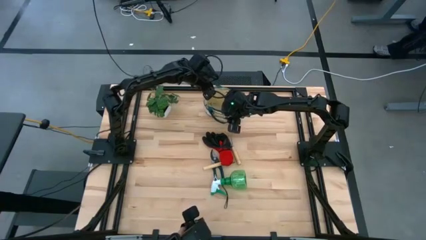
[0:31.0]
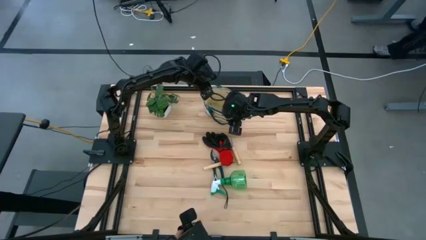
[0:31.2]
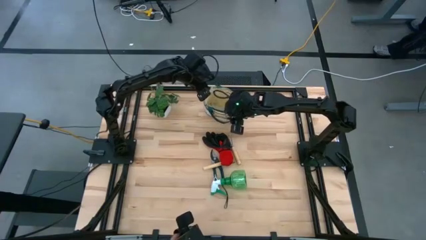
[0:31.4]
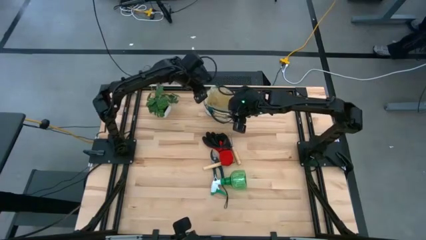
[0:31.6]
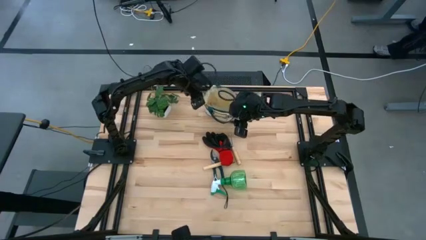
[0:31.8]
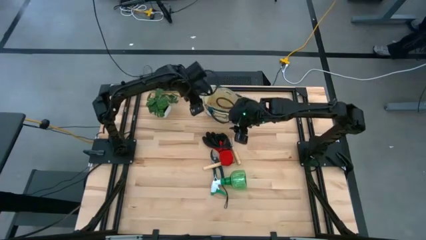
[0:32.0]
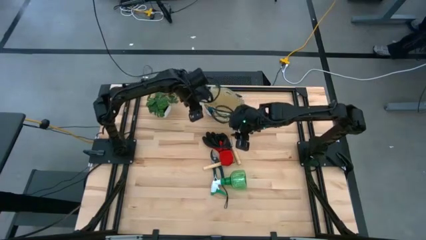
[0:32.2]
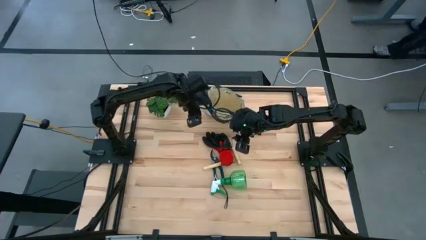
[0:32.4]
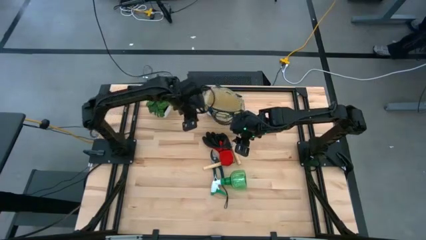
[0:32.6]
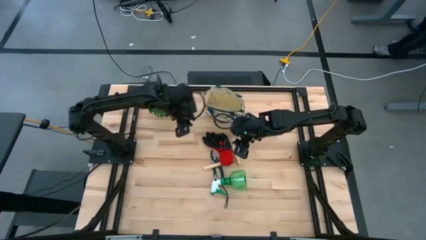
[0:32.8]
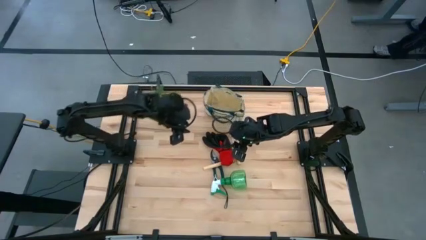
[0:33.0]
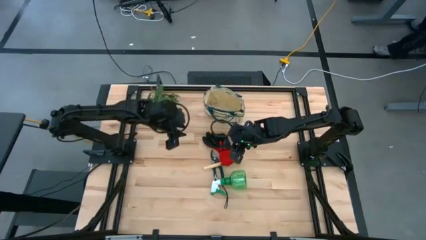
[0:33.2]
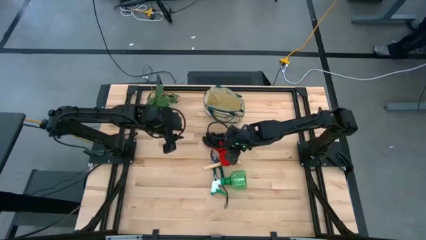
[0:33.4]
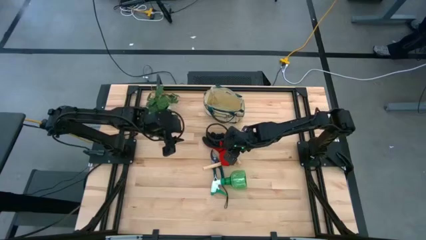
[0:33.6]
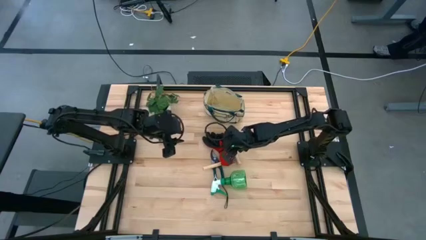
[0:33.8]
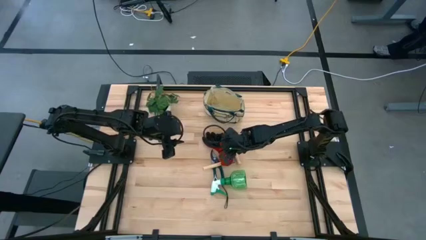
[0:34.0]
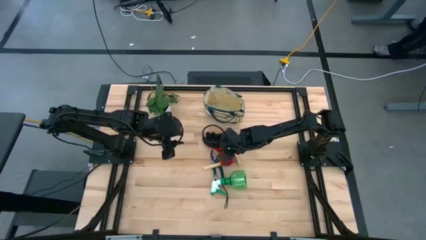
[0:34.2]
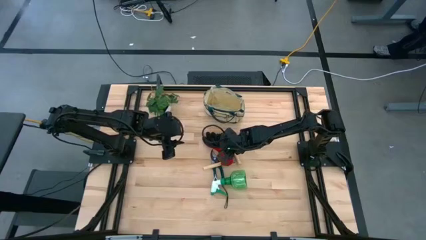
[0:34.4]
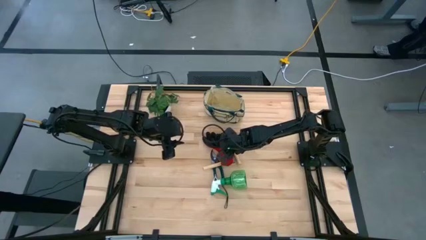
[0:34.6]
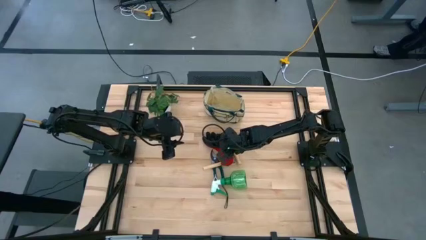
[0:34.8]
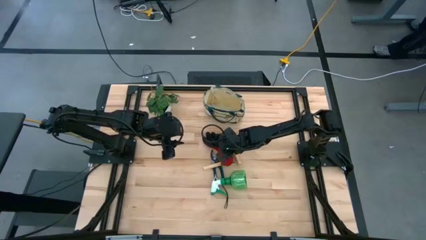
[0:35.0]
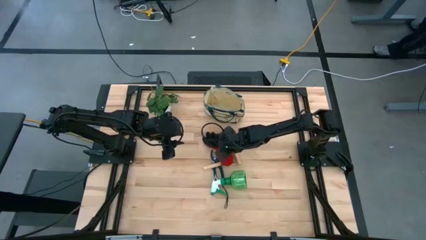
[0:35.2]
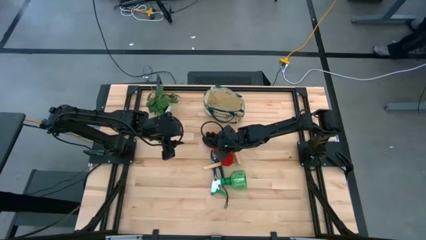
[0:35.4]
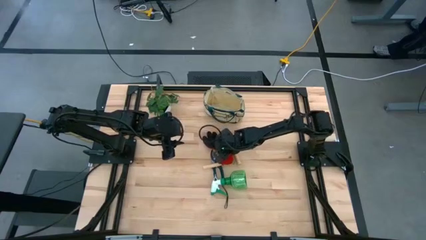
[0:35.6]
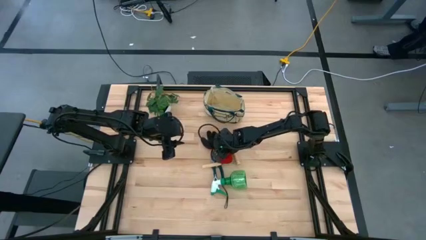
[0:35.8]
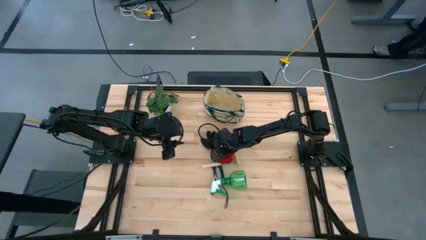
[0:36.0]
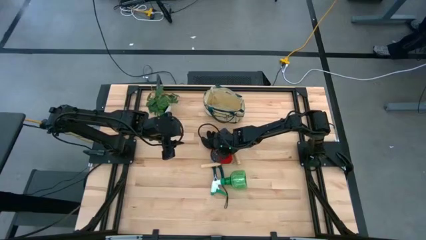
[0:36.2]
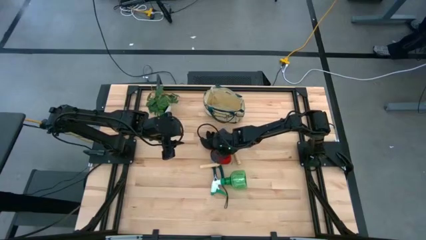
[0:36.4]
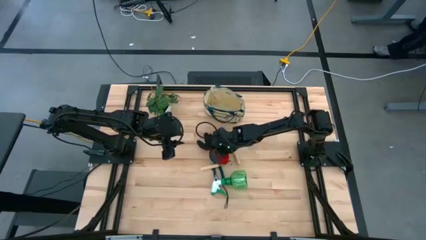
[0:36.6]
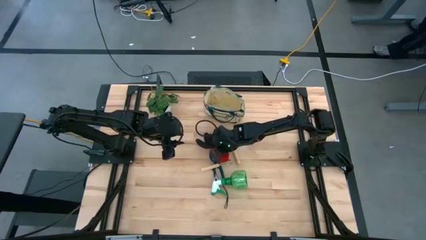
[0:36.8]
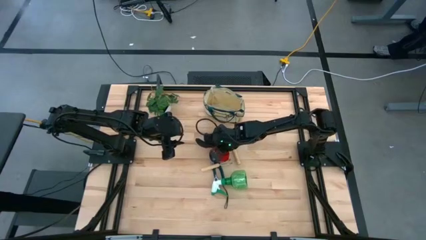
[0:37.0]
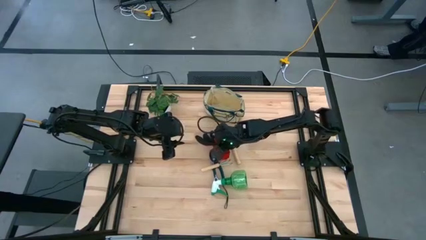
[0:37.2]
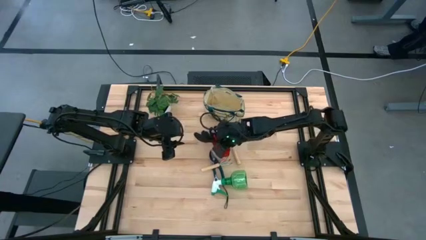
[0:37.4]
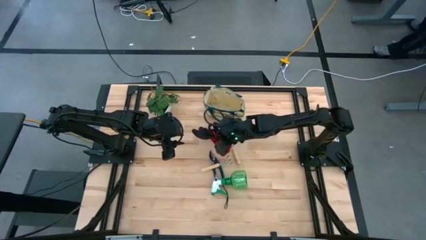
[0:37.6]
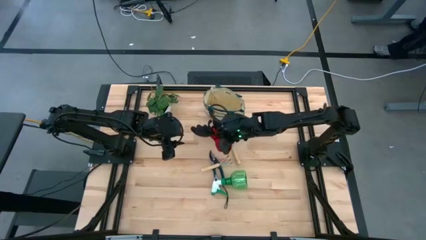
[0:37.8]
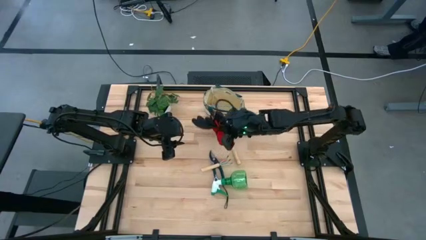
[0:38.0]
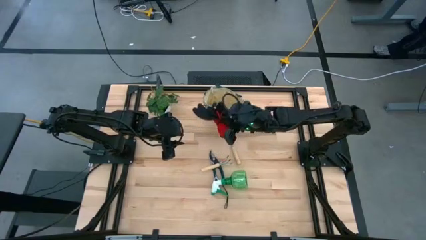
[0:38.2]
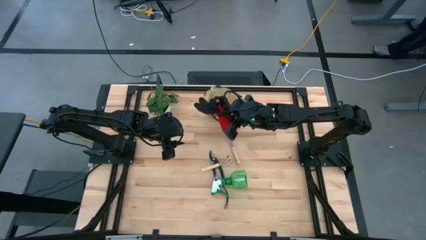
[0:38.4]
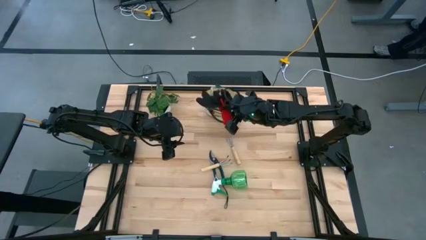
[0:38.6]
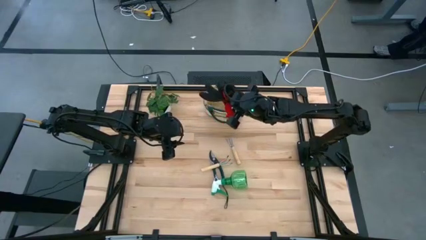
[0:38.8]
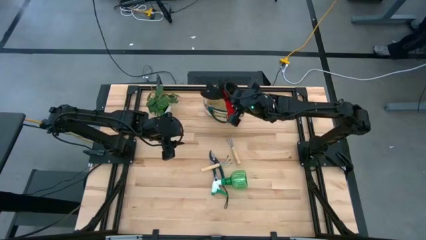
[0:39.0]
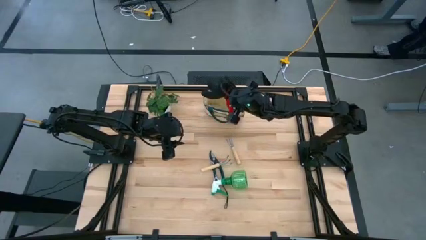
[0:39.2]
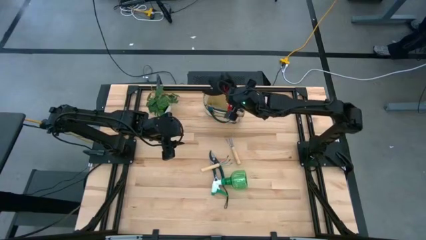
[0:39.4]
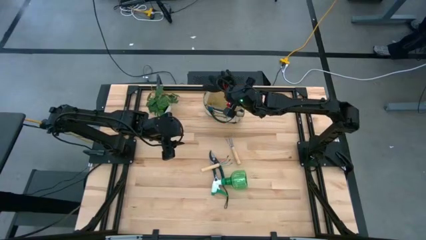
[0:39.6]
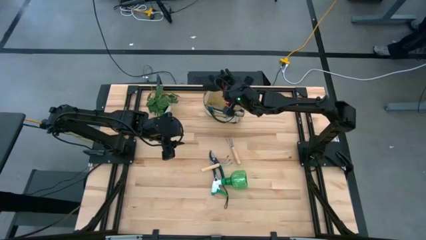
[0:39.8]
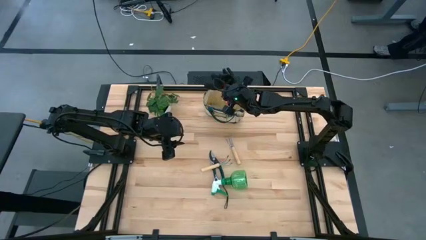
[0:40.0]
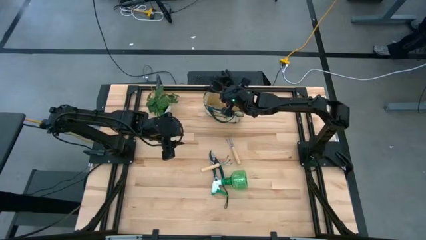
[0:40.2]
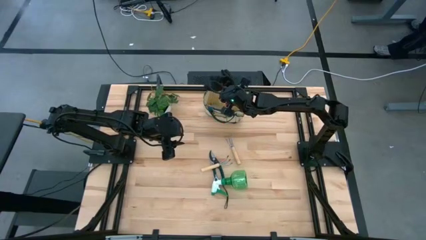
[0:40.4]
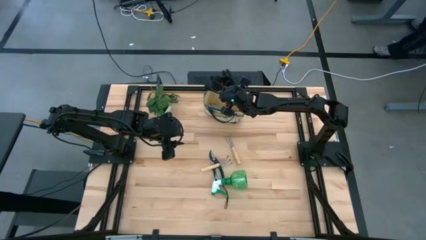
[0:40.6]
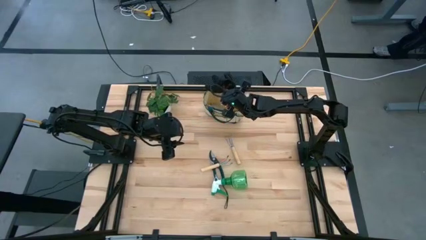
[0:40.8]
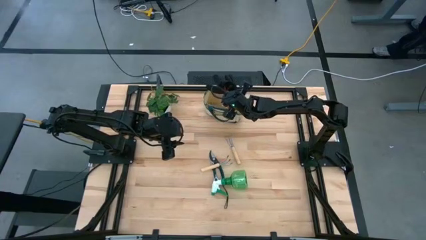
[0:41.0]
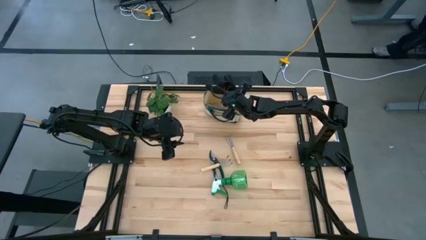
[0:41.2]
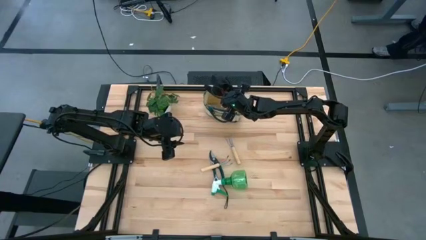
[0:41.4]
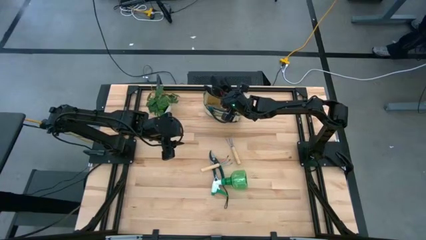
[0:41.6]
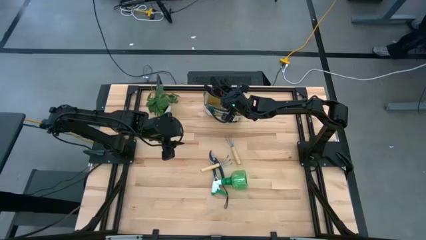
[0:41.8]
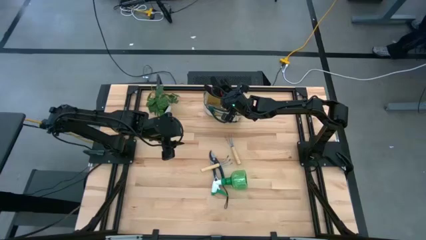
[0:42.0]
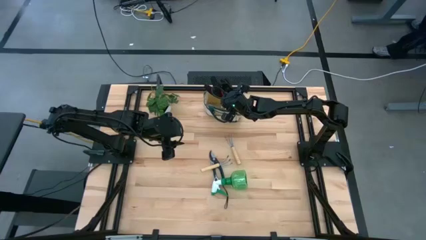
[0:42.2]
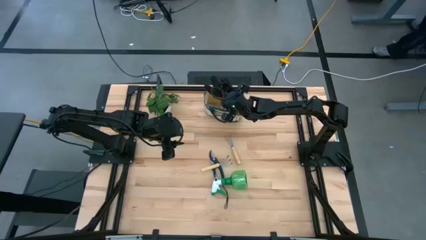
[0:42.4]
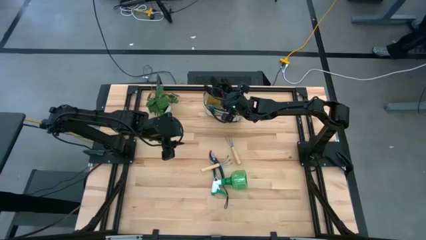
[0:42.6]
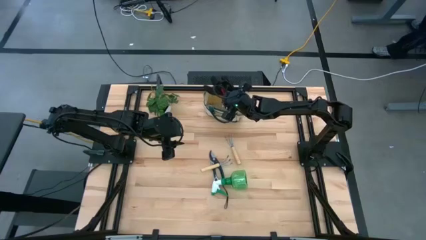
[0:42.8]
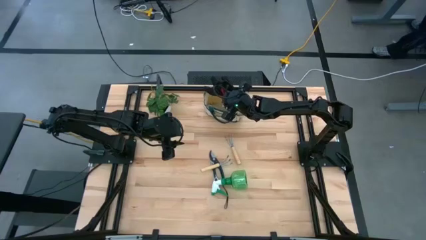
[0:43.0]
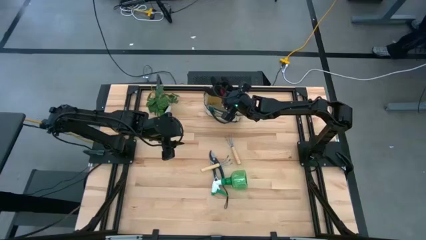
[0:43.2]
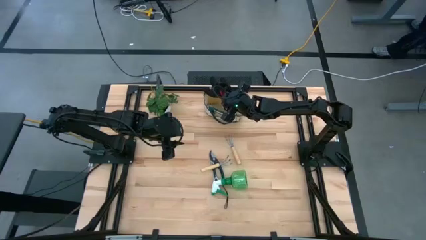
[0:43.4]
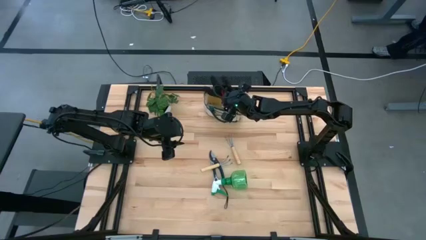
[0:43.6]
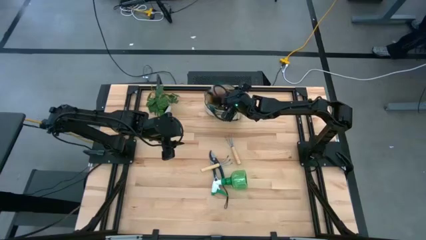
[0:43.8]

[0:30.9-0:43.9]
Task: Pick & Place Garden tools in Gardening bag
Put the red gloves into the gardening bag

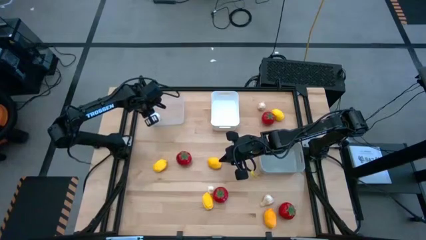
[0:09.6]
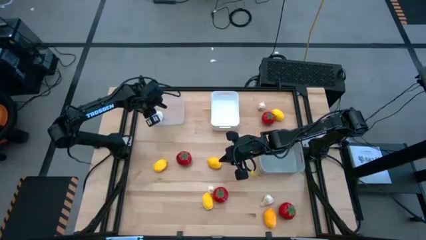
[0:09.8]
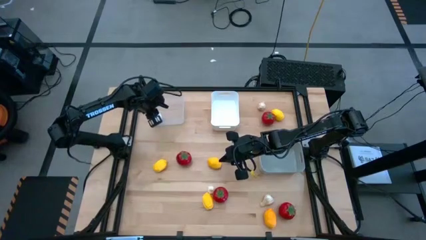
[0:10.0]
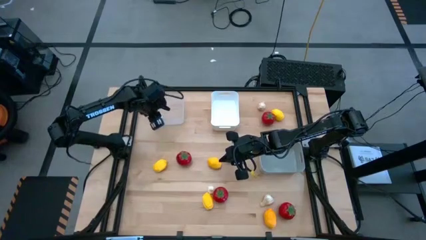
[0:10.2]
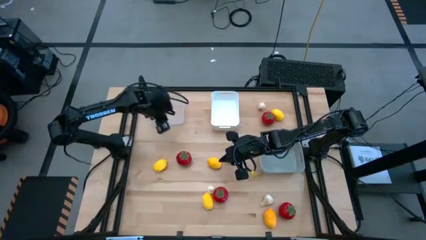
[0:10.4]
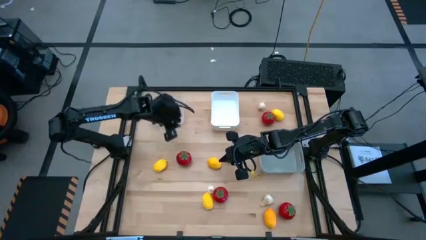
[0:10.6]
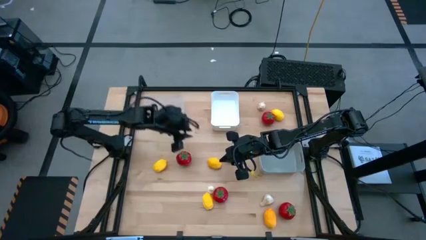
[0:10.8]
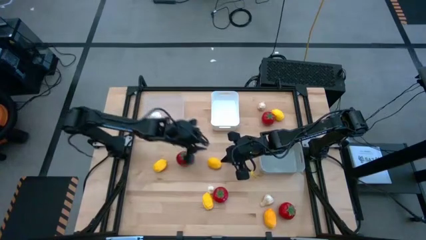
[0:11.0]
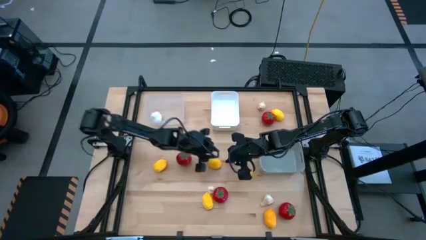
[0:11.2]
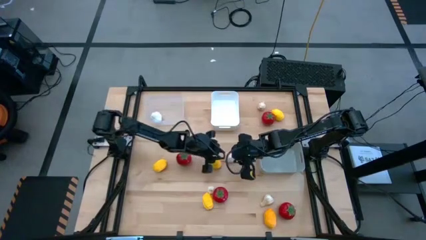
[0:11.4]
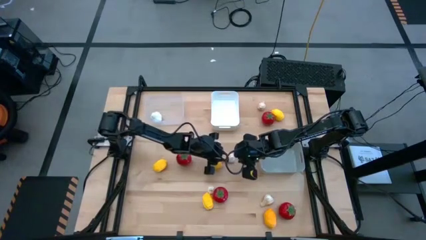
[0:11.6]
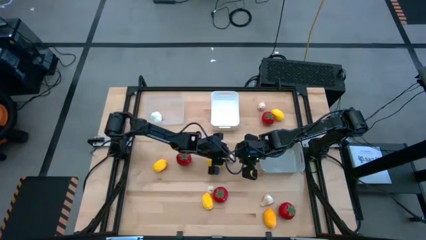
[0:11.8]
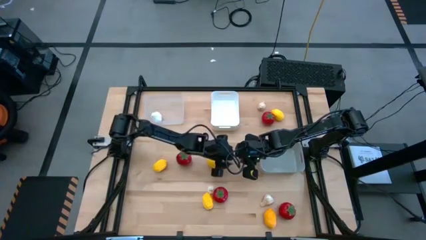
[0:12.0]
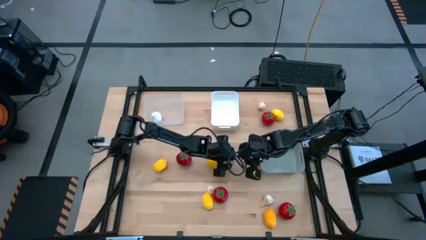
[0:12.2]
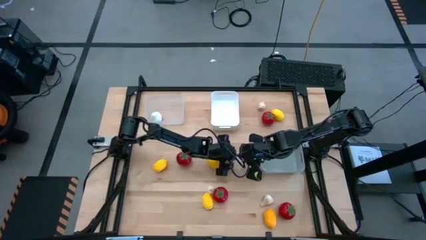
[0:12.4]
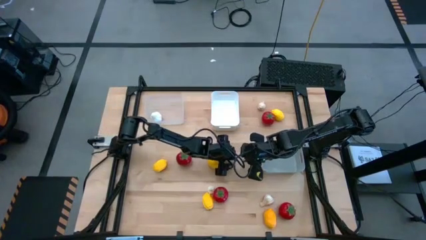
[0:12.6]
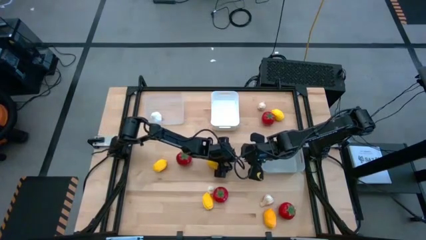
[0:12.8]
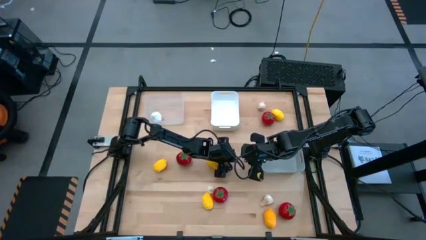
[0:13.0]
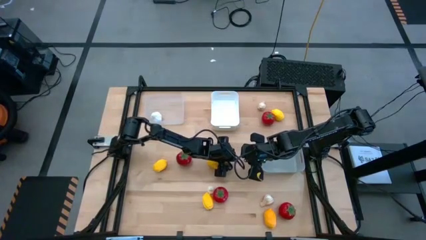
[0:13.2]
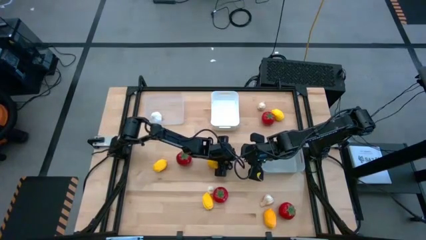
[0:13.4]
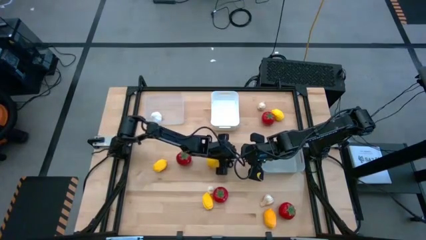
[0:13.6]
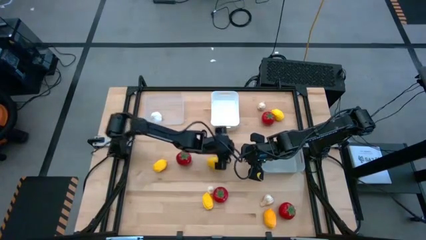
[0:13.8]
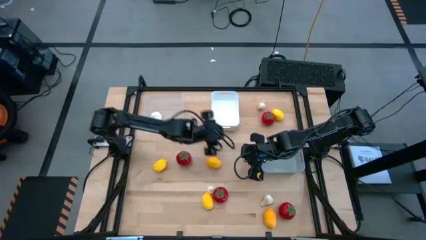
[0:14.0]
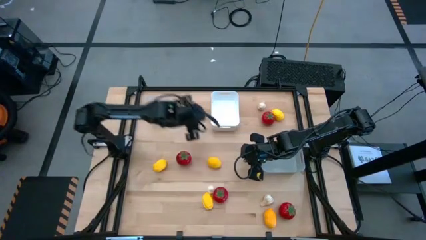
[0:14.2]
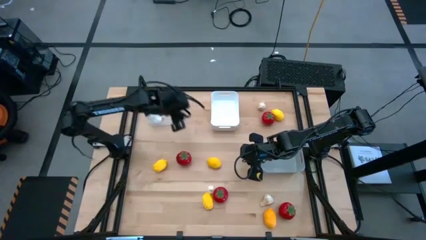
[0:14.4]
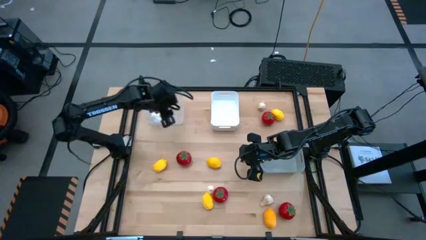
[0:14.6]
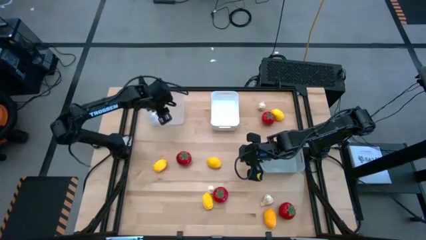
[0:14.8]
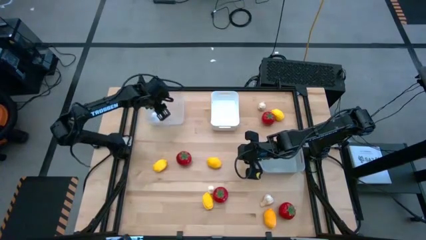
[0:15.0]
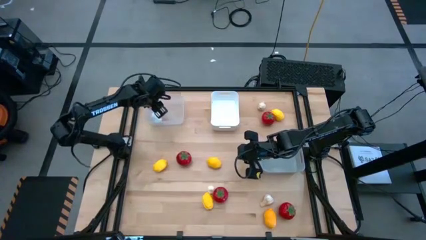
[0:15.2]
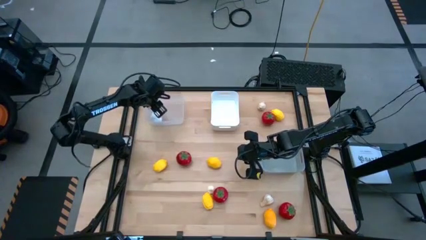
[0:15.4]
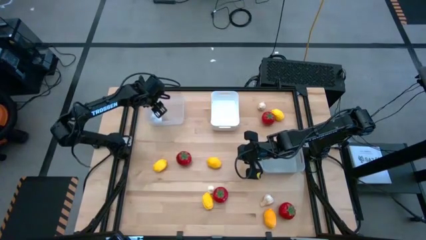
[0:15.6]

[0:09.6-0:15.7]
Task: Sort produce into baskets
Put the garlic into the transparent bin
